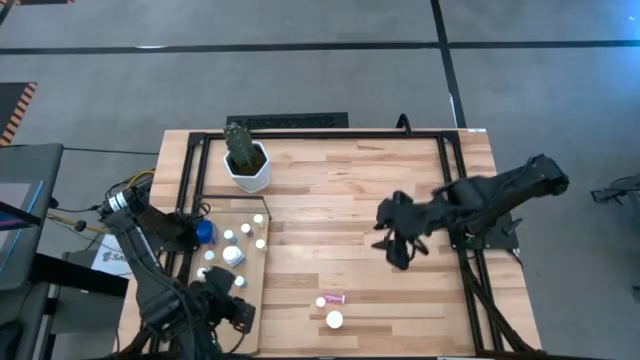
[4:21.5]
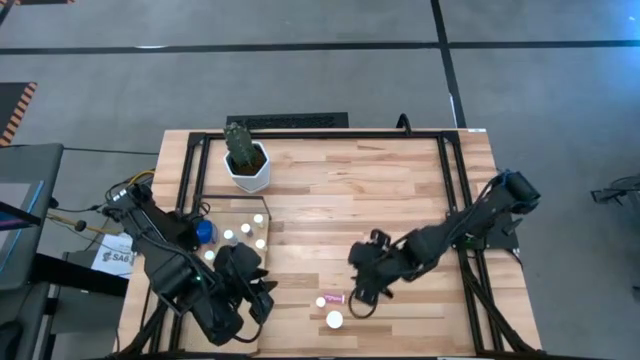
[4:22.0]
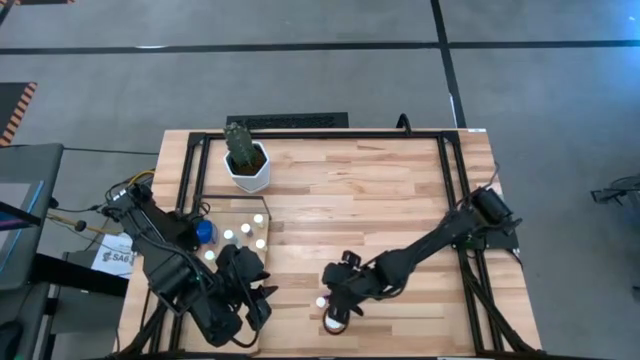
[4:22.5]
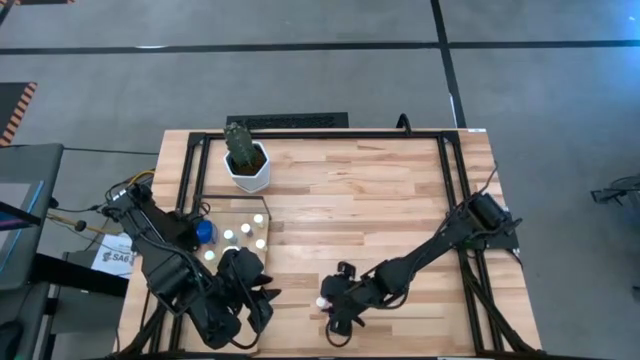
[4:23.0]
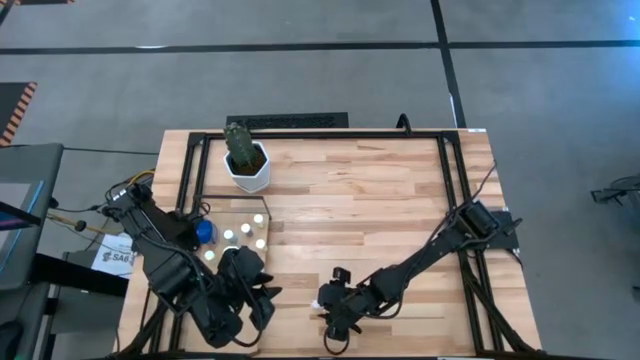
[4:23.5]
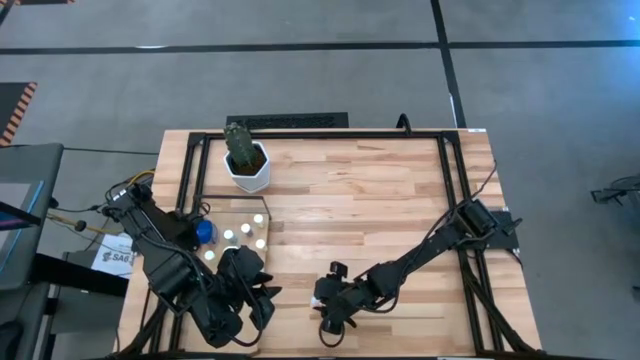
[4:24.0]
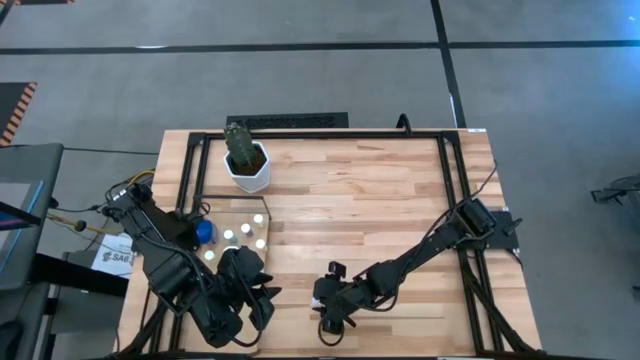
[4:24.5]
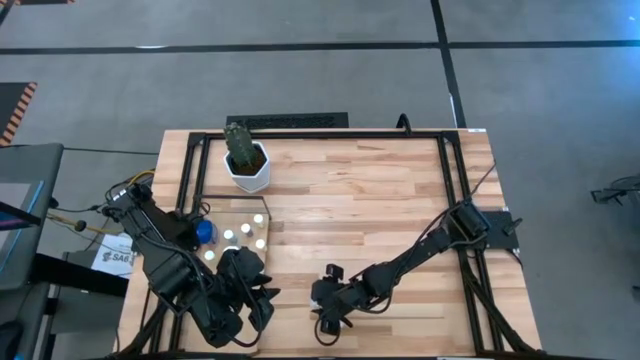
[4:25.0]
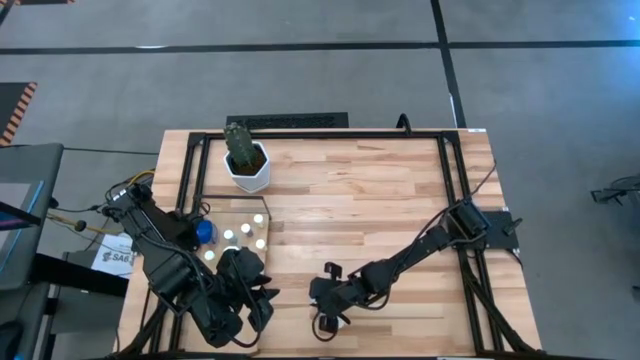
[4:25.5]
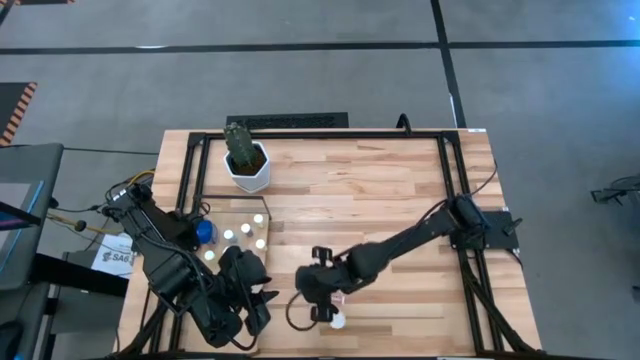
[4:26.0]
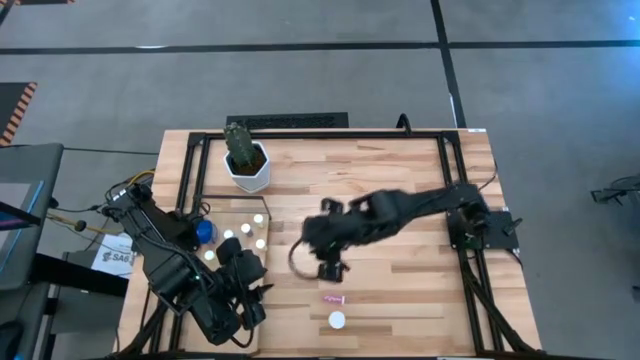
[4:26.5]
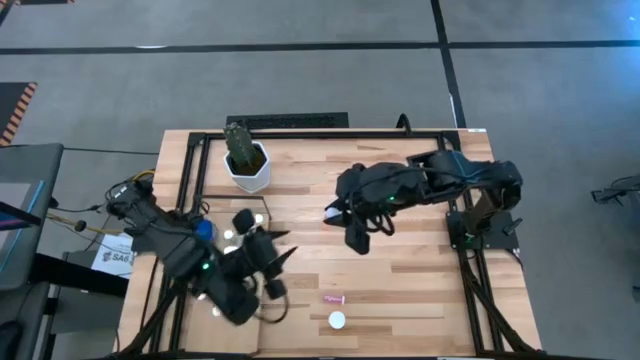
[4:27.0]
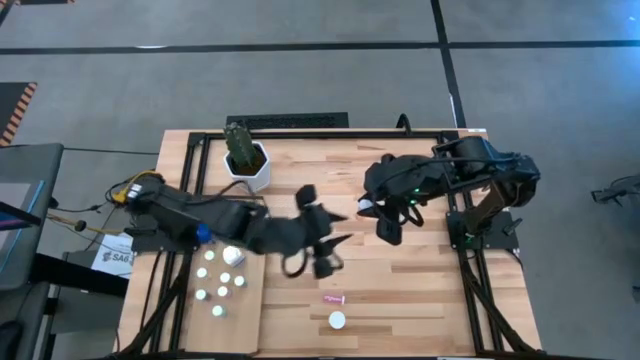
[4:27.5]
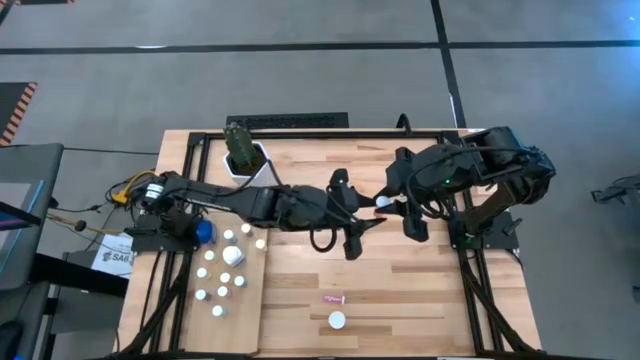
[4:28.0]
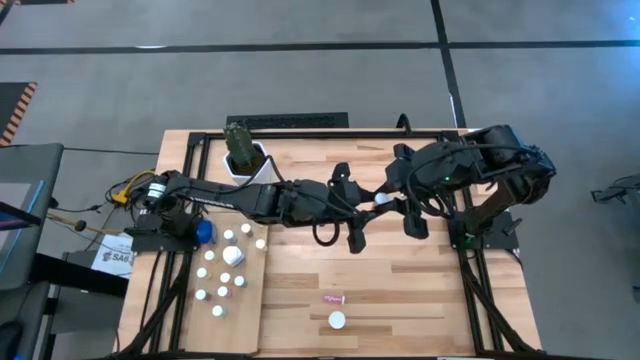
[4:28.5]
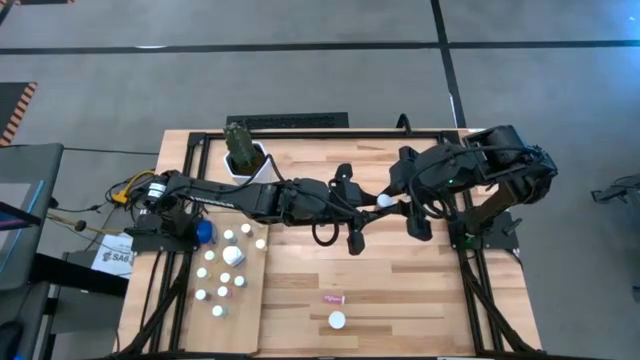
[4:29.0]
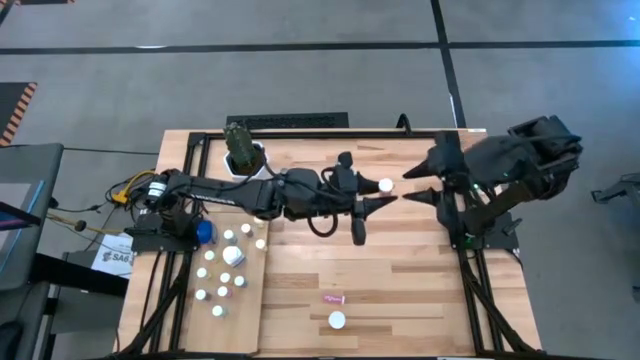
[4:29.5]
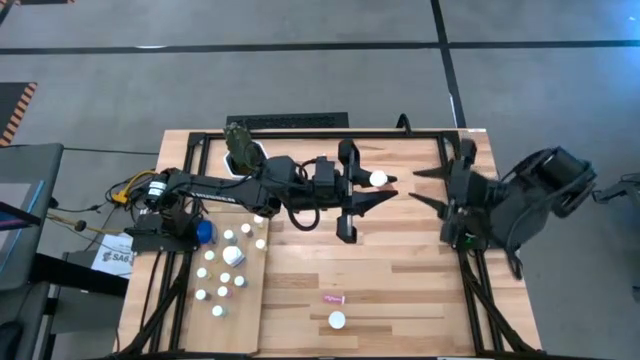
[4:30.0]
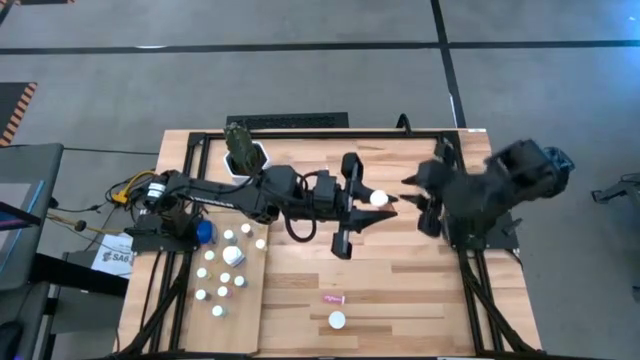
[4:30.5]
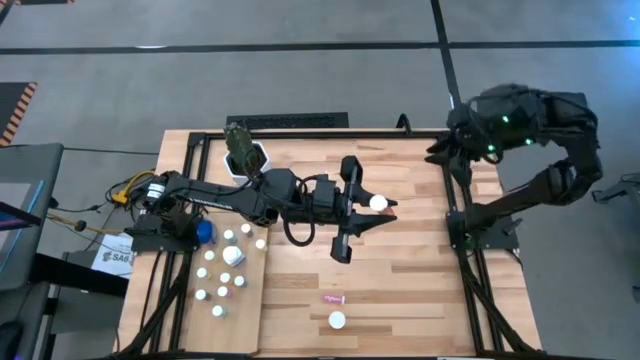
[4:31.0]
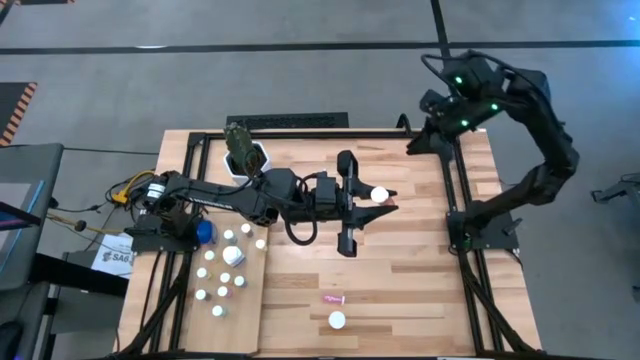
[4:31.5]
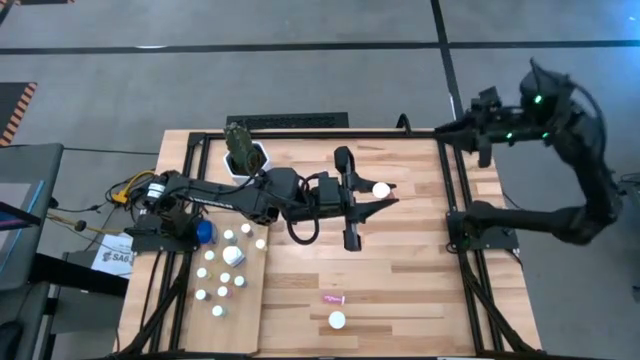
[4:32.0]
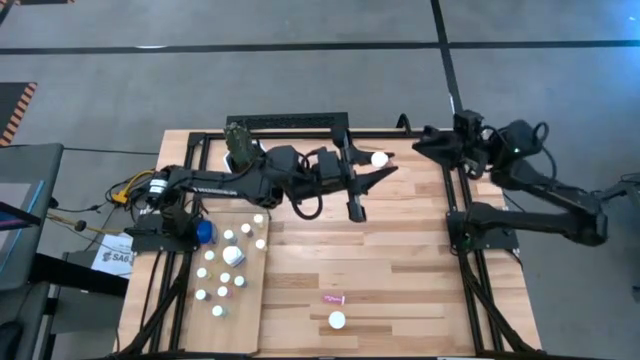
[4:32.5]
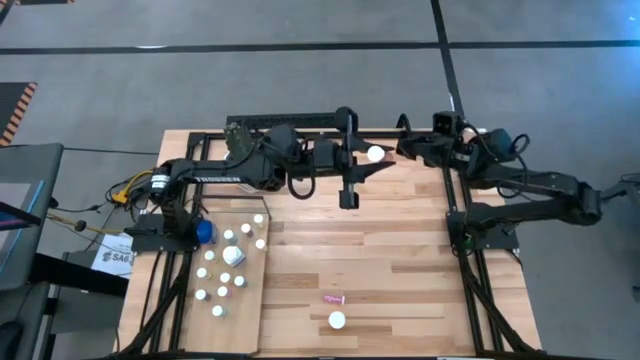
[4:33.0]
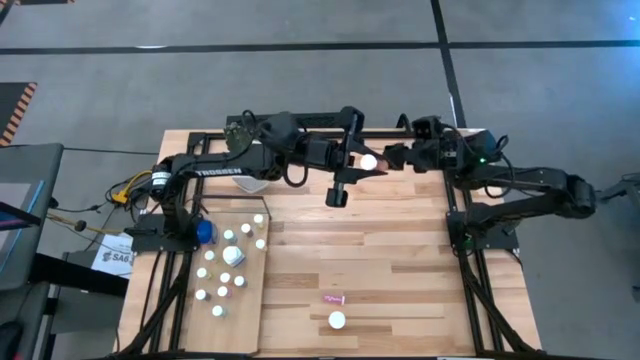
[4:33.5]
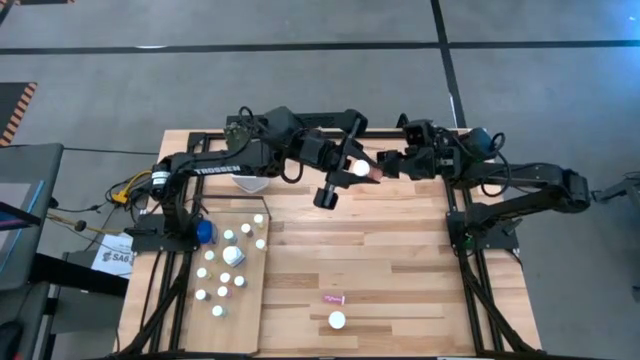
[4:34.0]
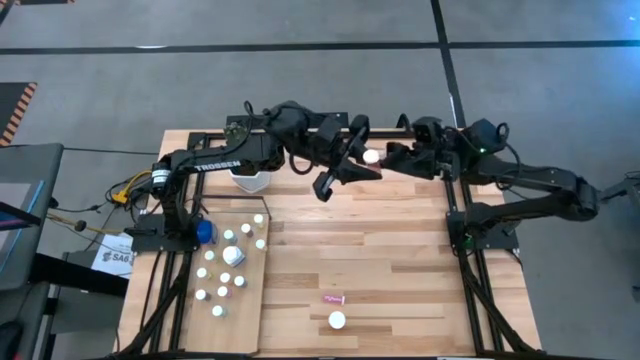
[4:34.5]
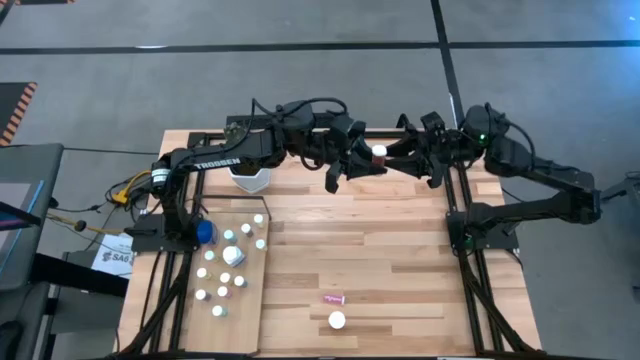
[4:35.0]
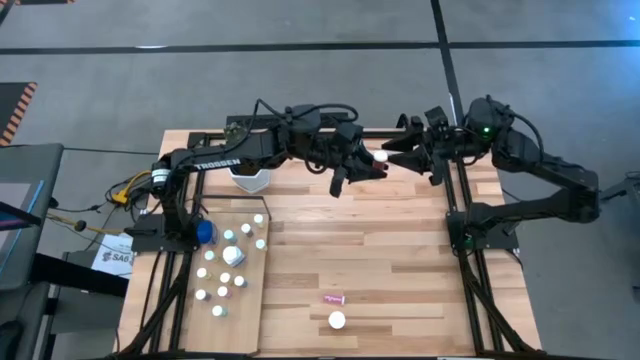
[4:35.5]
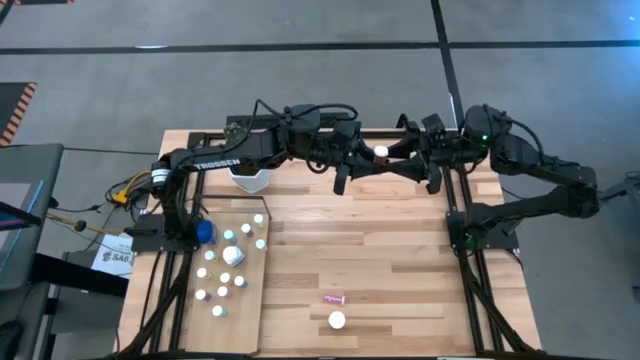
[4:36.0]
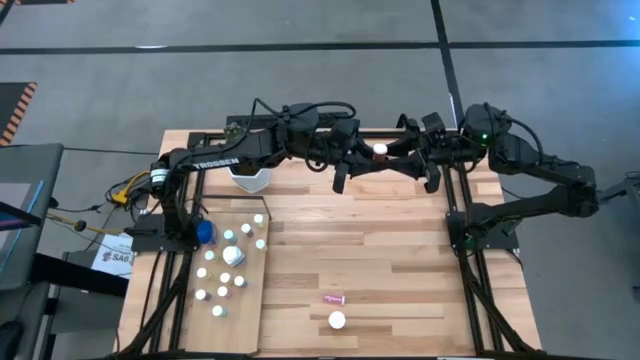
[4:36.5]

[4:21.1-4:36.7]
Task: Pick and place medicine bottles onto shelf by color
Put the red pill bottle on the shelf
